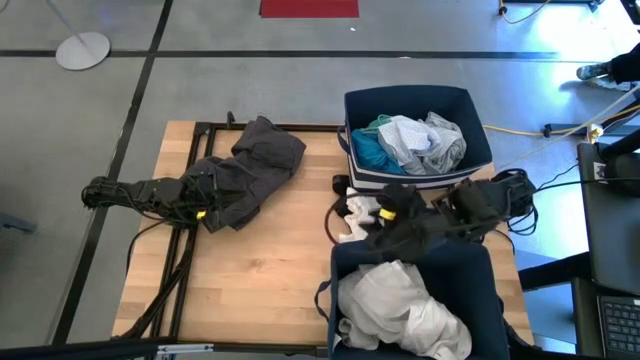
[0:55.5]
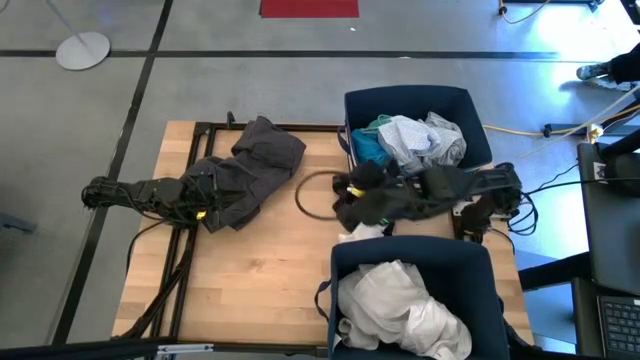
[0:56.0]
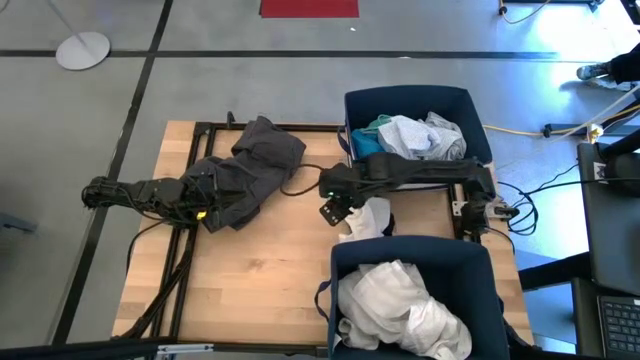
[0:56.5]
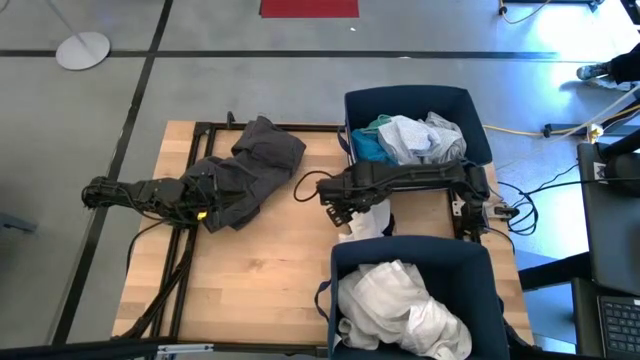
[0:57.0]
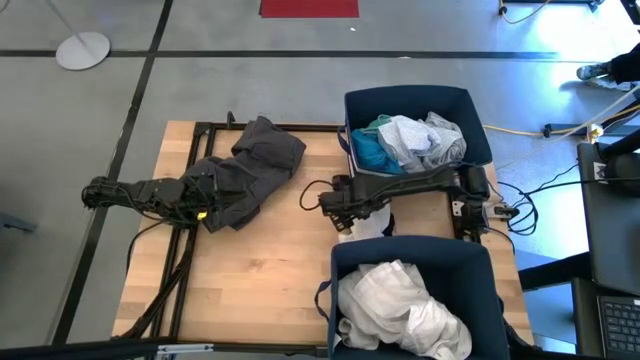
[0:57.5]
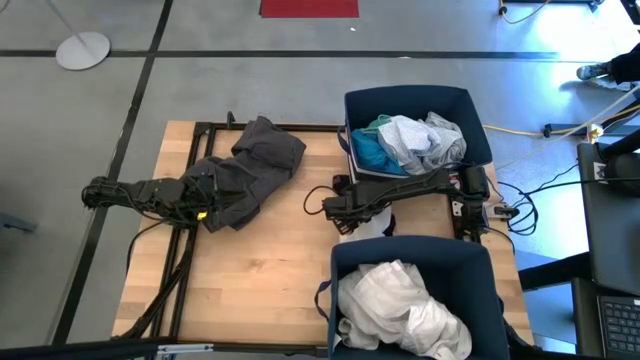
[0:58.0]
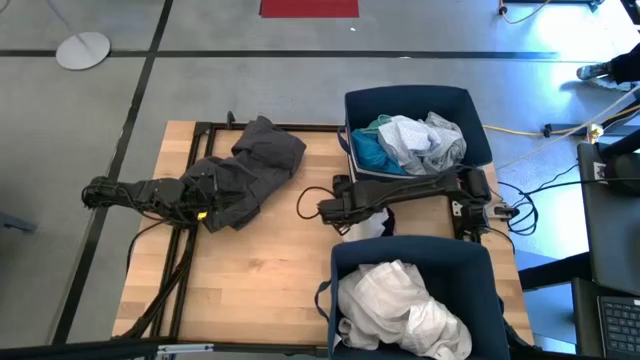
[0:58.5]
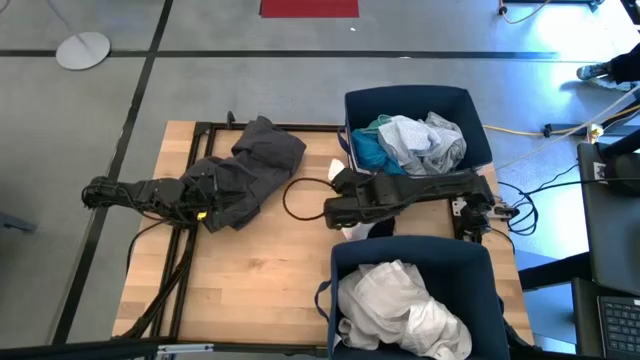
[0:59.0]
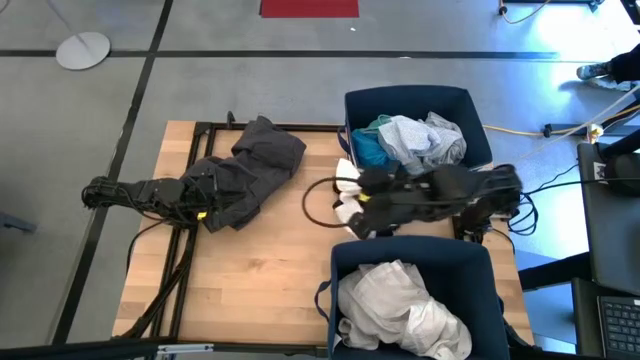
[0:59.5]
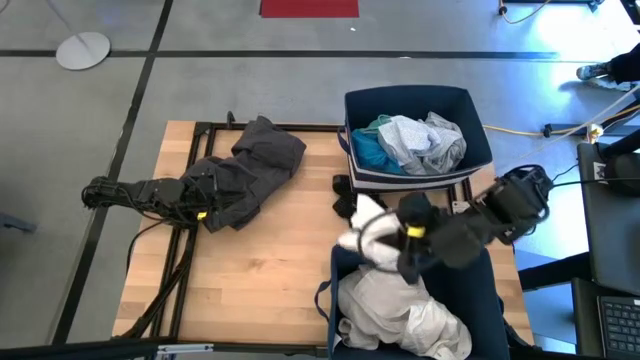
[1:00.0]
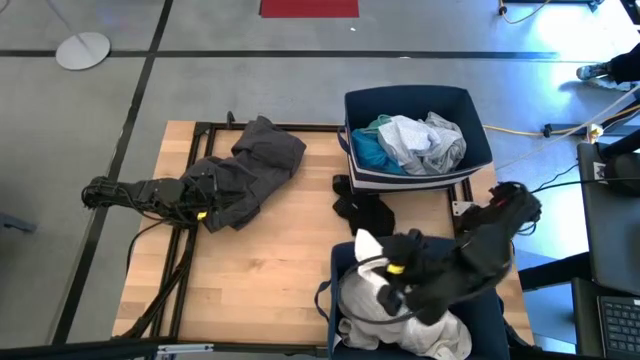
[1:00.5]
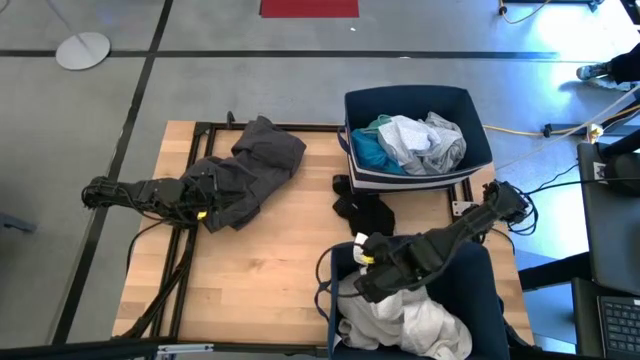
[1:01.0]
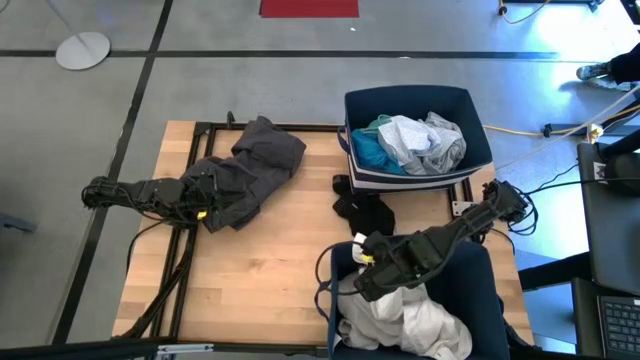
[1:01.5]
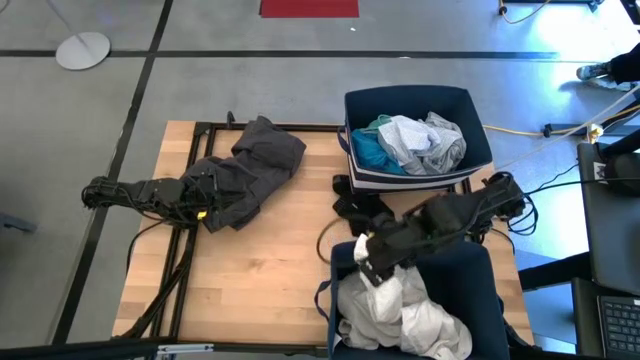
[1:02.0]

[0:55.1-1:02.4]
Task: Sort clothes
Put the white boxer into the bottom laundry bin

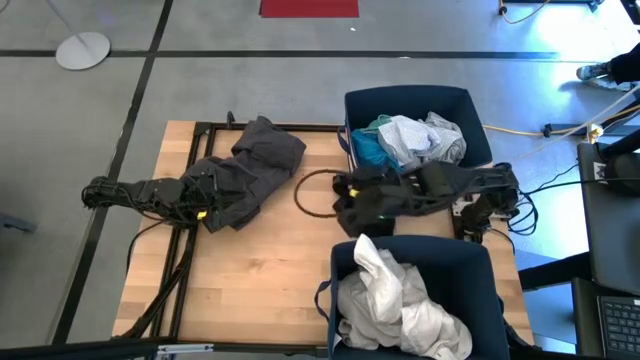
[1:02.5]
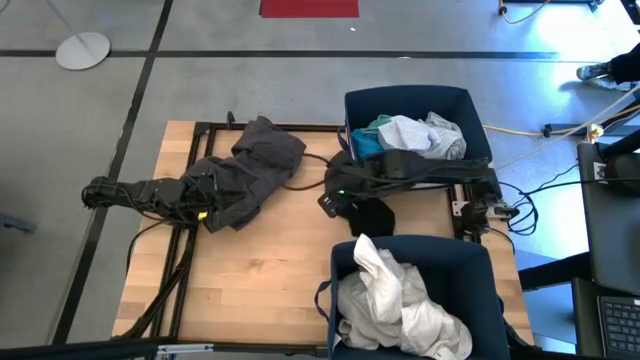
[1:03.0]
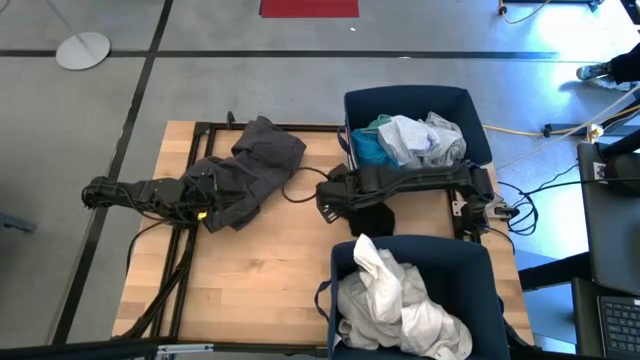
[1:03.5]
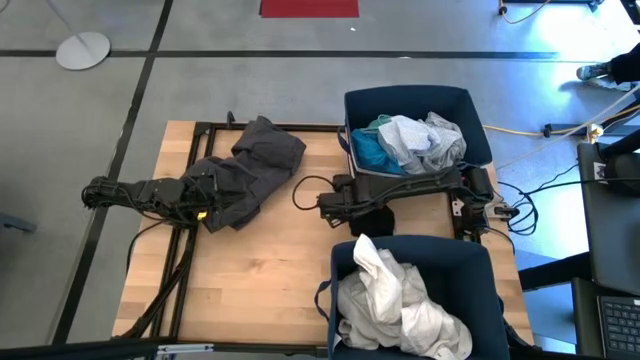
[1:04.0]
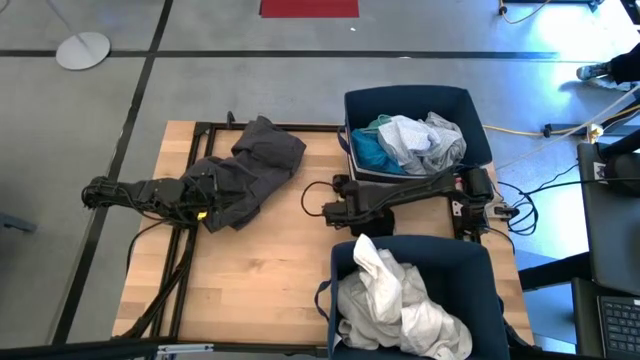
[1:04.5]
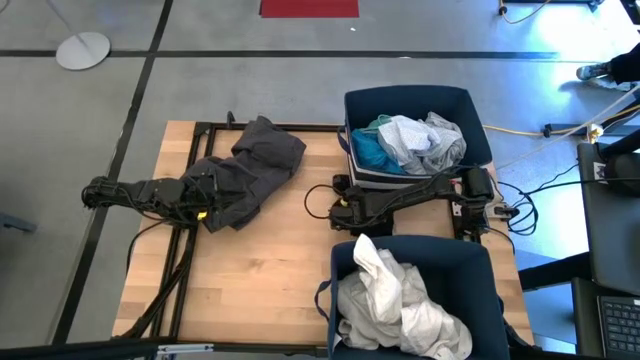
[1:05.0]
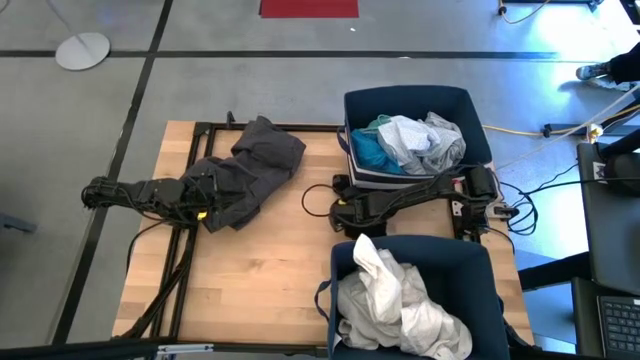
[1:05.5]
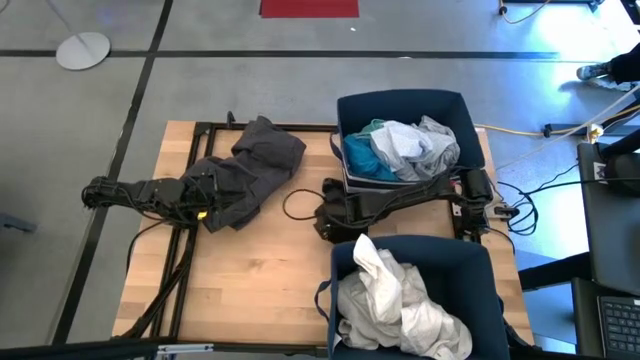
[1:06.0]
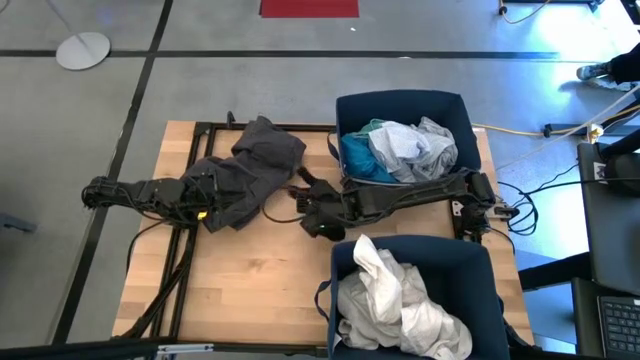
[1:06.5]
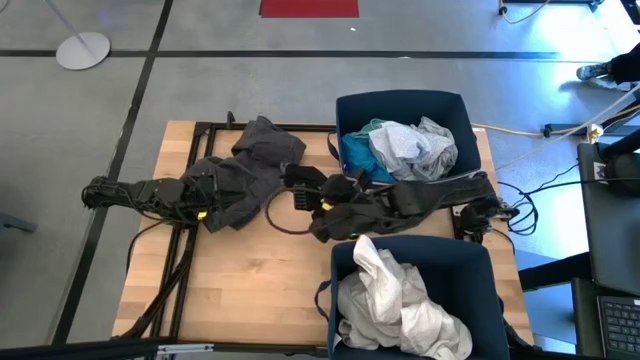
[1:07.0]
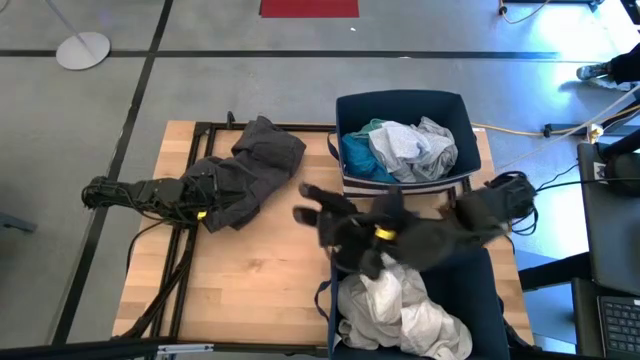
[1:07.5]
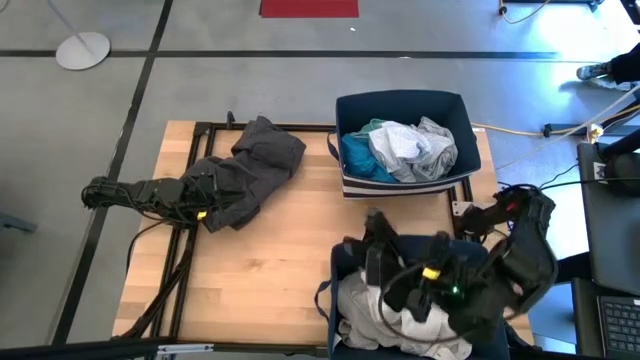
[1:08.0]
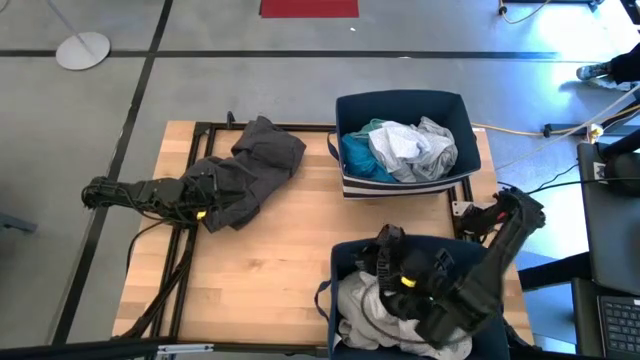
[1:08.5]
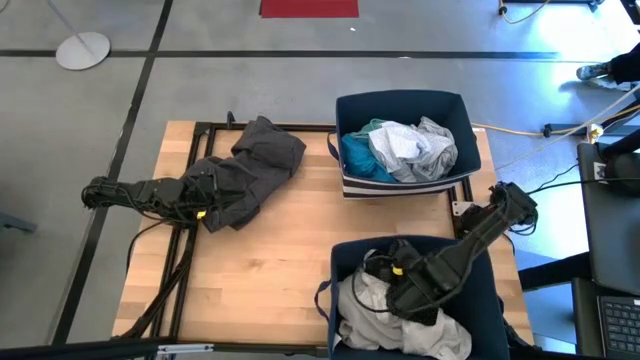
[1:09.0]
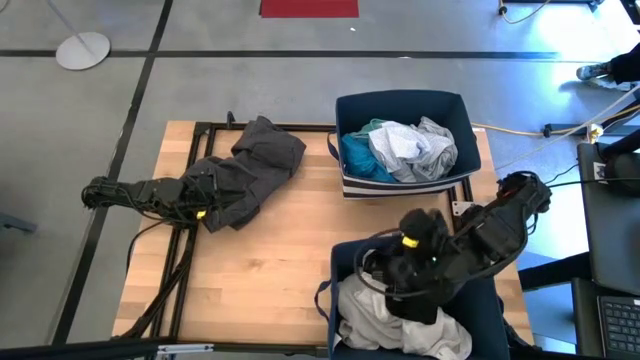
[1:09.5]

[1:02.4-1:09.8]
Put the black boxer into the bottom laundry bin

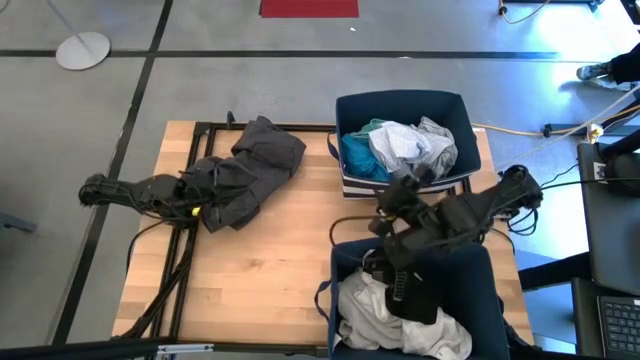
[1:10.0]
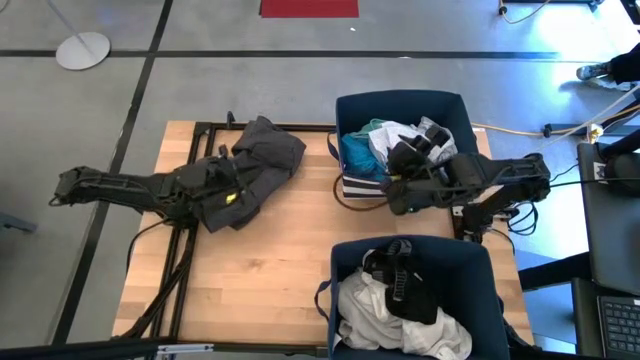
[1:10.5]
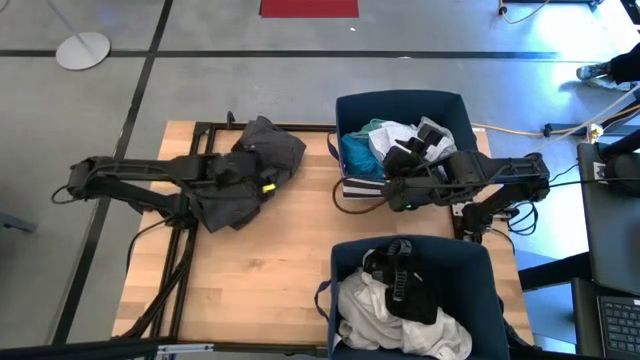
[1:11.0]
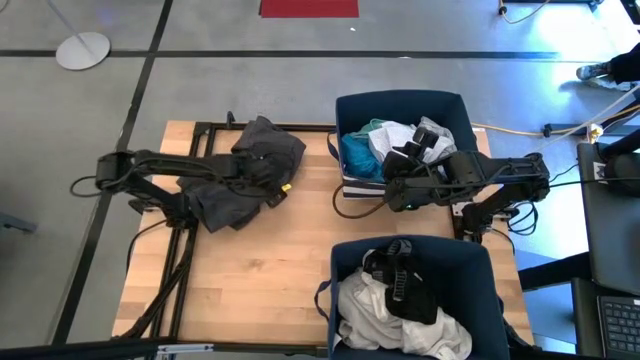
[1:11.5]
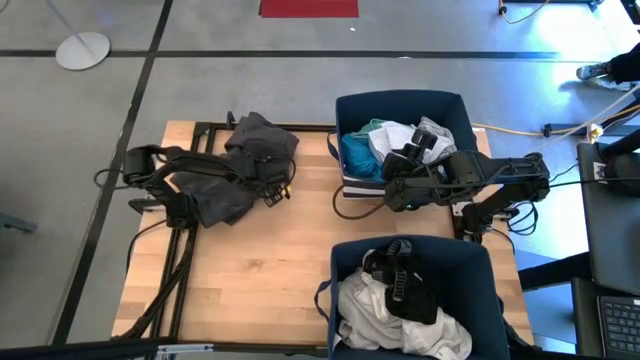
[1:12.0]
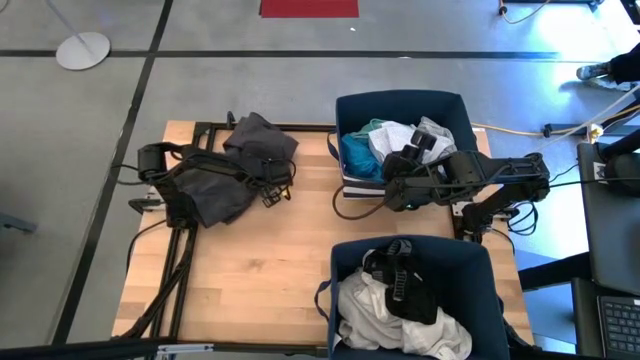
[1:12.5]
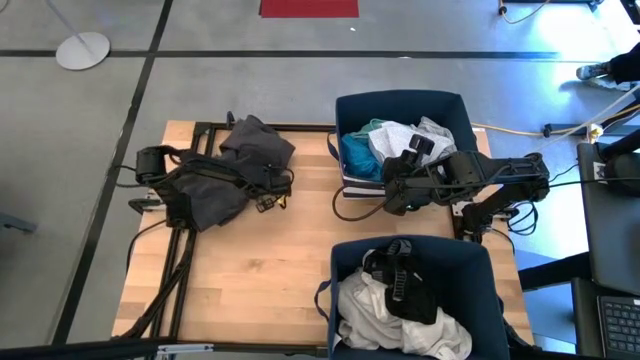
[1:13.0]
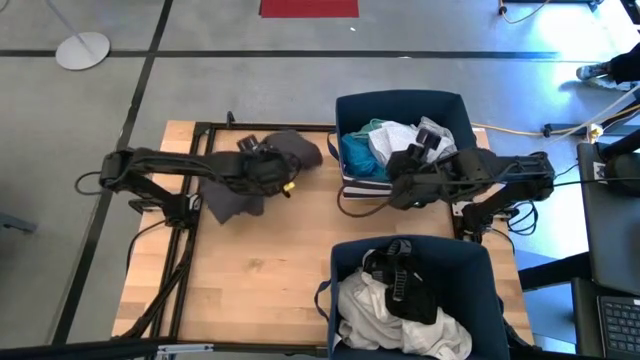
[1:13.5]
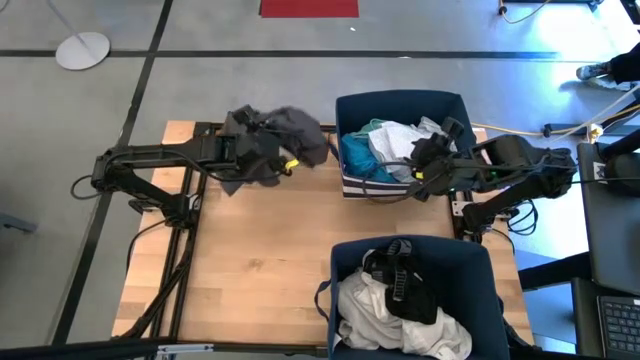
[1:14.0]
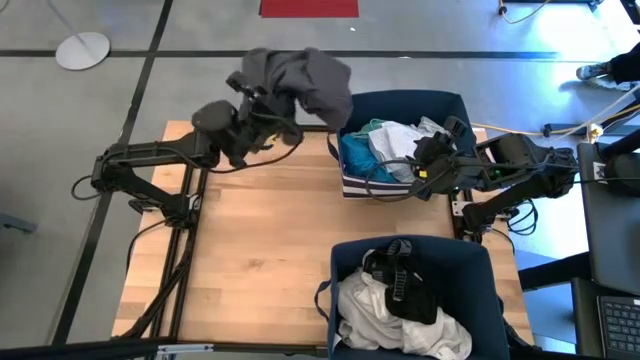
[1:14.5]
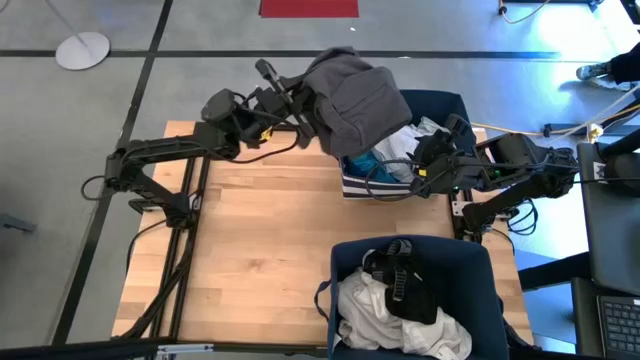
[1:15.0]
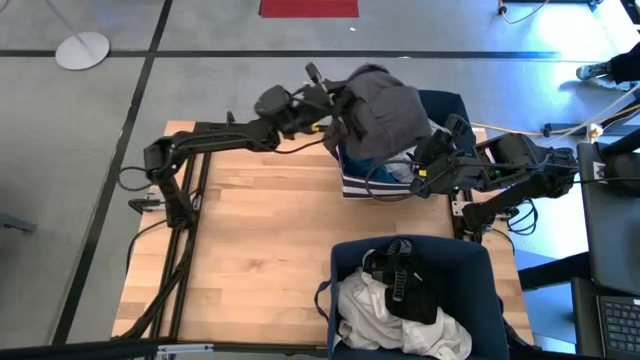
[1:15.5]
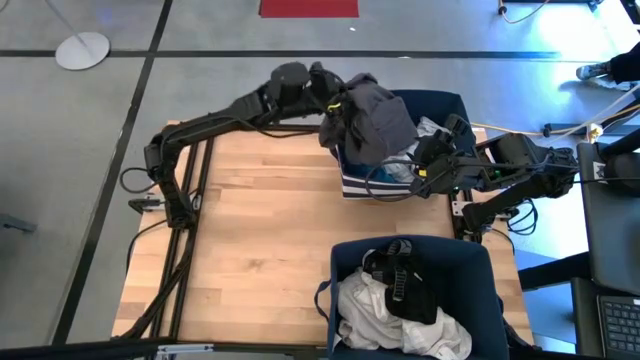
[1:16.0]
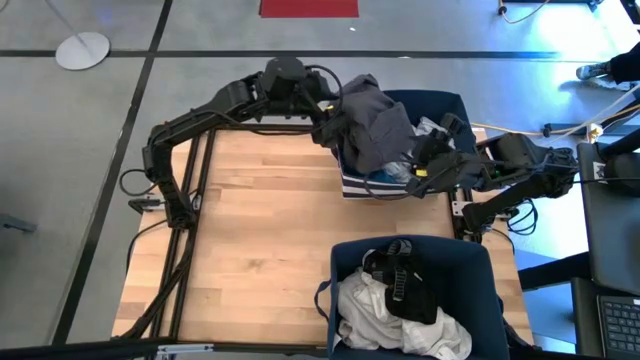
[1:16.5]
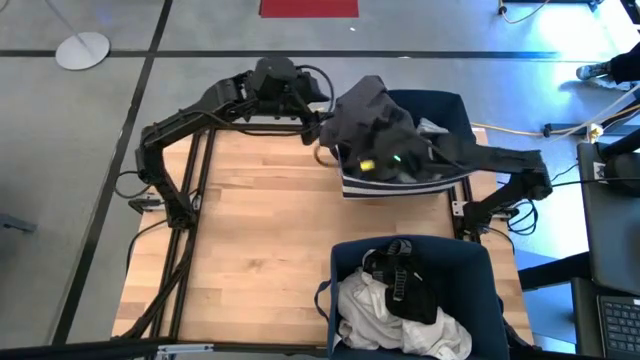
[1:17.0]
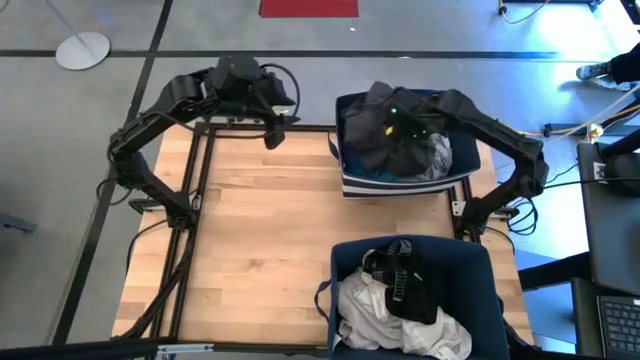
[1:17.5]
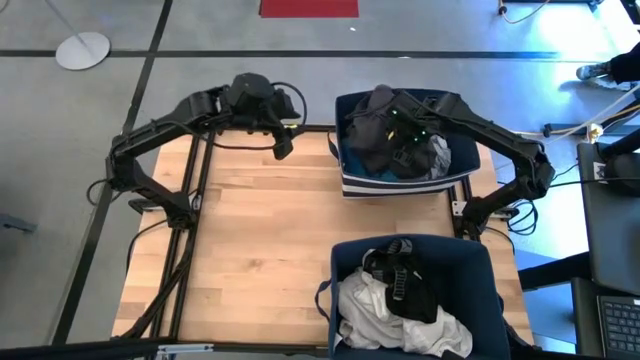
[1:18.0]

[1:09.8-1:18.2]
Put the black shorts into the top laundry bin
